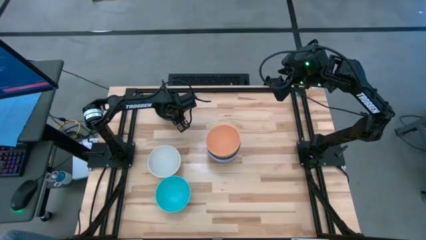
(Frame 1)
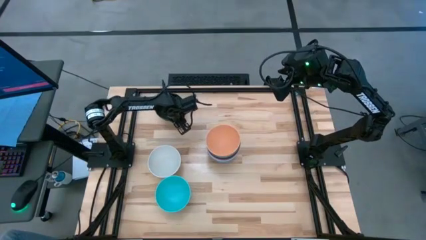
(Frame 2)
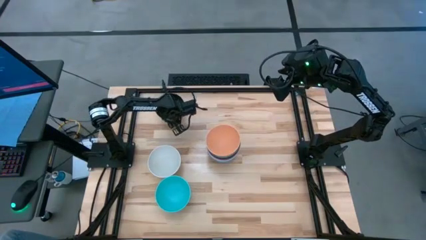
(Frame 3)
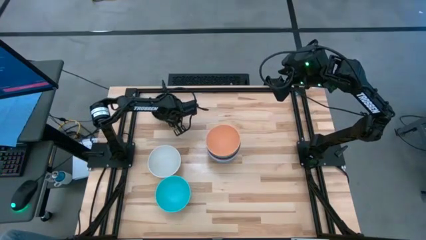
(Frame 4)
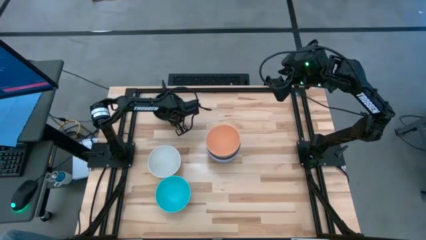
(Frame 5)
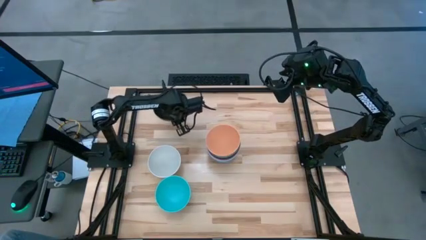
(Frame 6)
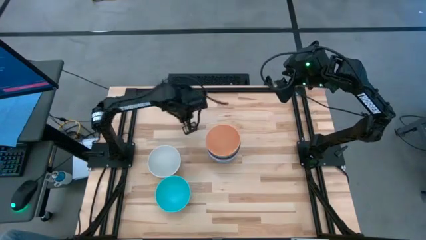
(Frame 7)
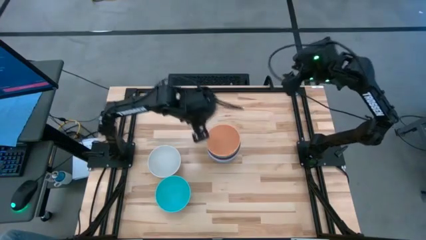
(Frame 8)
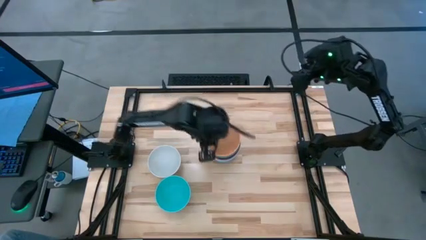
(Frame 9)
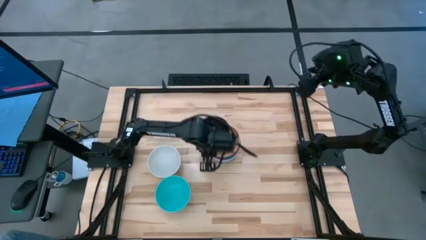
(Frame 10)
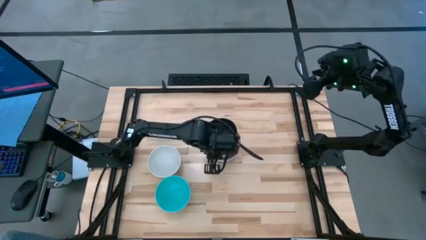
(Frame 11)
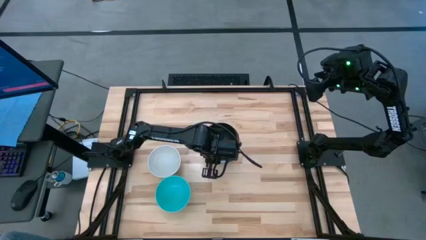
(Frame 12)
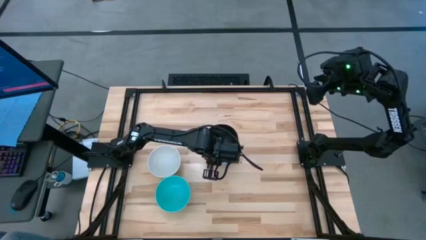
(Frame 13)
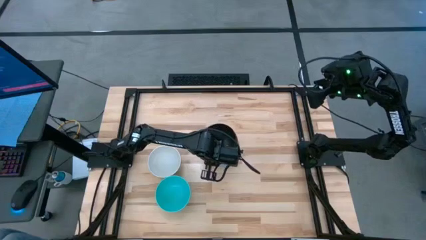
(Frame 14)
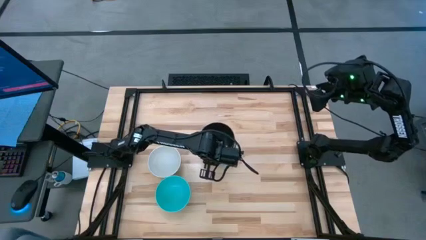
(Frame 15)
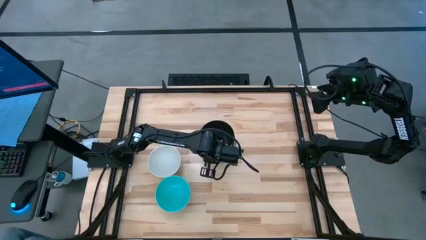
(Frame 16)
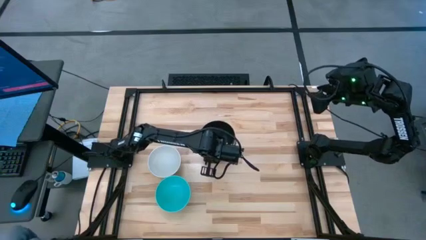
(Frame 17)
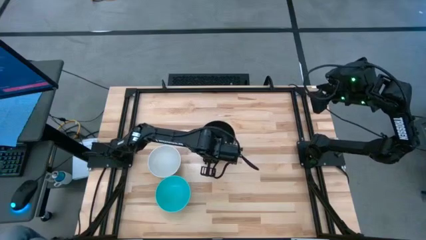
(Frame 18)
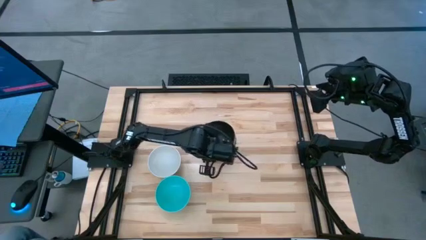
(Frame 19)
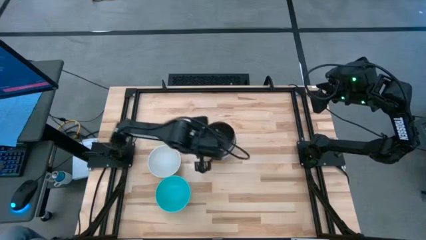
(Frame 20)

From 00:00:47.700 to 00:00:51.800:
Task: Nest bowls inside each other
Stack the black bowl on top of the orange bowls

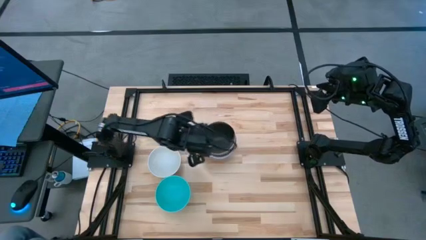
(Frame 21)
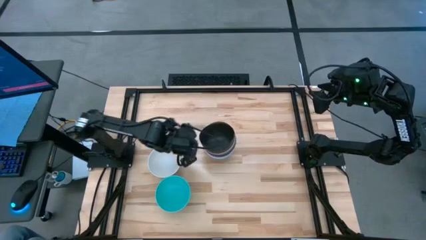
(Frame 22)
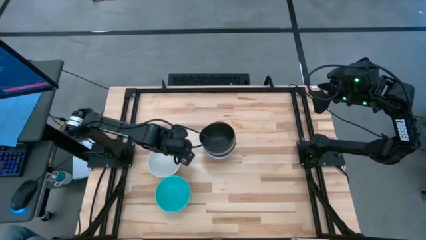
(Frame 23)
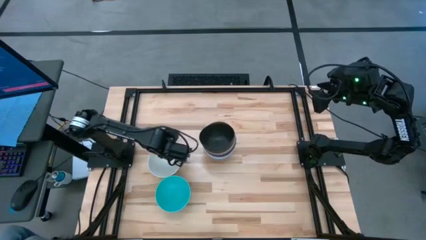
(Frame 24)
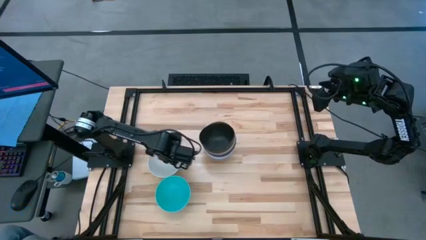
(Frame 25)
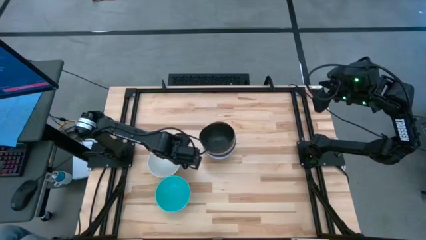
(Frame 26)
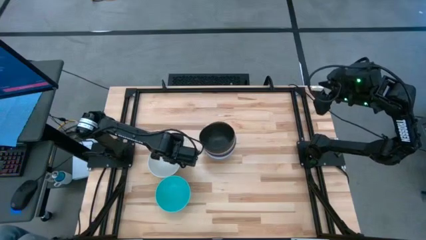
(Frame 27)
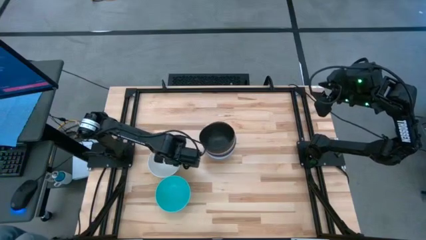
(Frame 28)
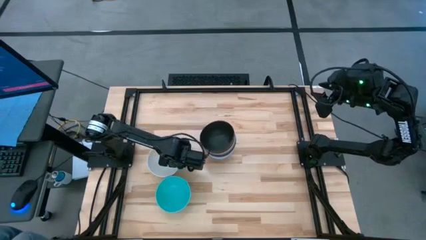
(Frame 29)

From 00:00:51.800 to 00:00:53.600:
Stack the gray bowl on top of the black bowls

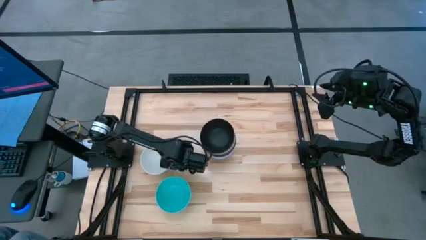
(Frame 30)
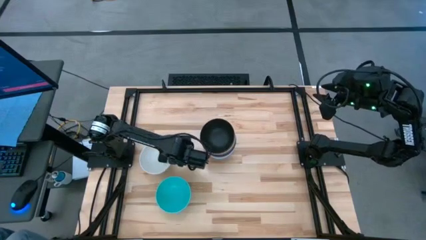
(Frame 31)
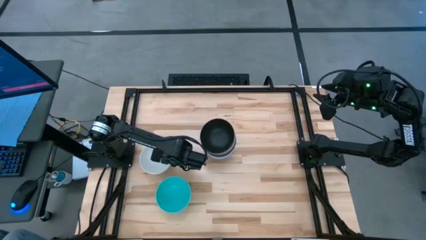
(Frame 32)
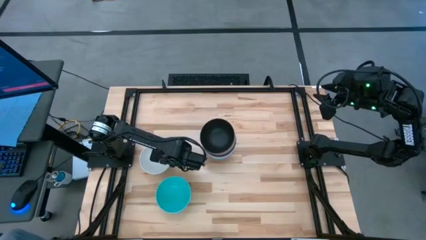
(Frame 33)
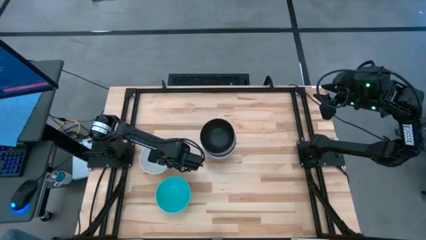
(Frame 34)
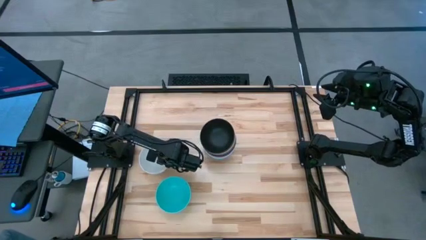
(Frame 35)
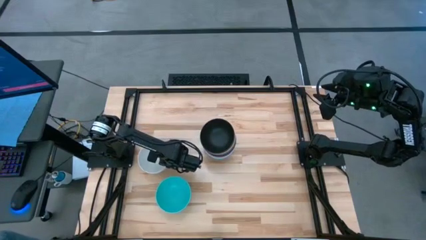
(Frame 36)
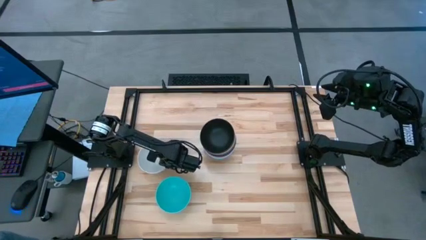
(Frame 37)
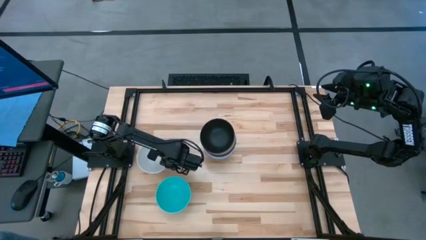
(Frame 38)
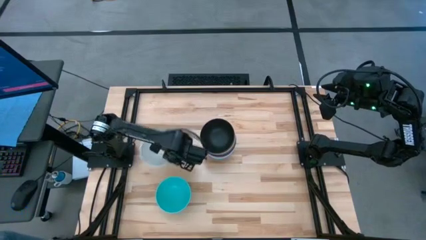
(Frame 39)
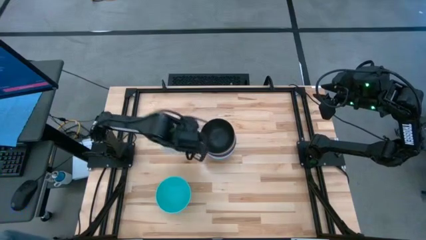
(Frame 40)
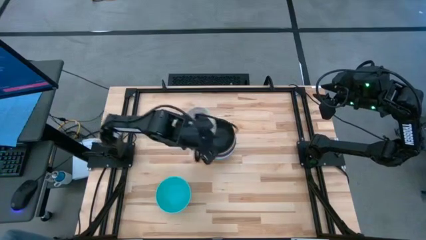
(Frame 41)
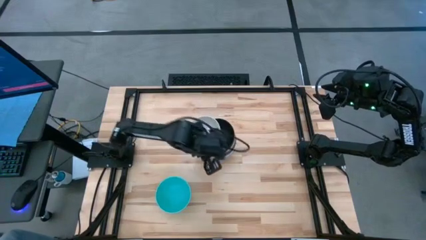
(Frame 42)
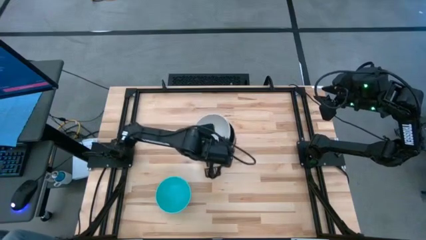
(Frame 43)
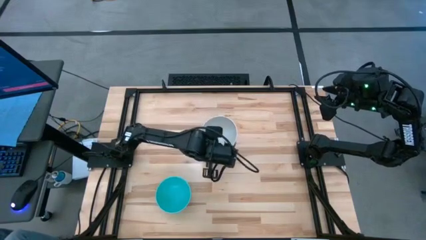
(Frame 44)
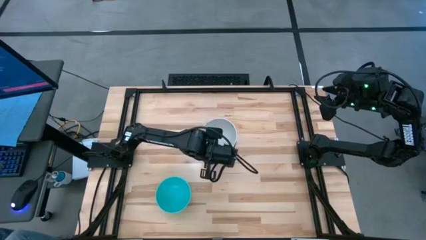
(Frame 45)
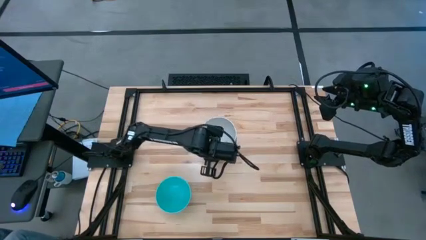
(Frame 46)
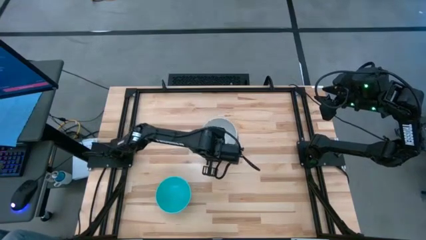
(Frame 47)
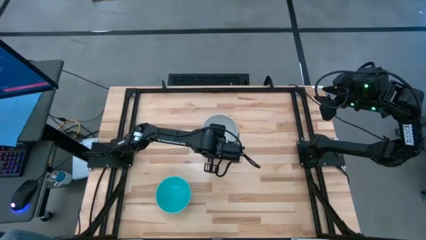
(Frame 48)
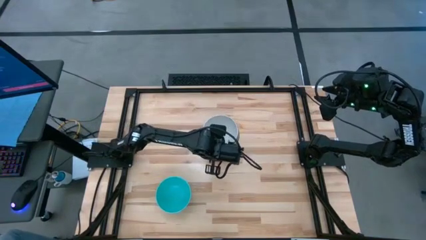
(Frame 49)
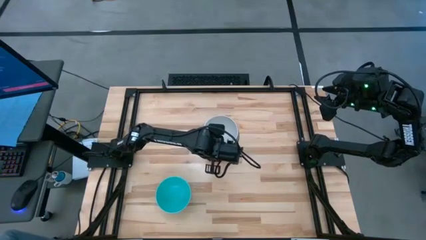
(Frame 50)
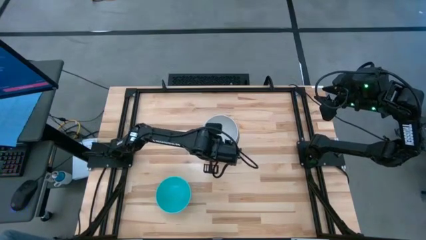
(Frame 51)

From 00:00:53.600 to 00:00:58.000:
Stack the gray bowl on top of the black bowls

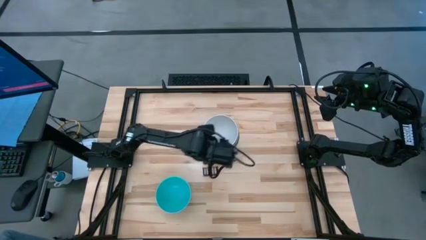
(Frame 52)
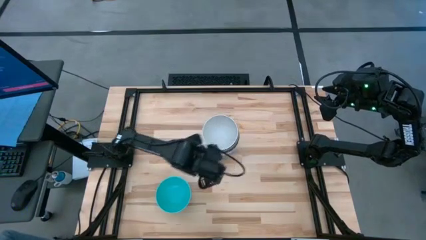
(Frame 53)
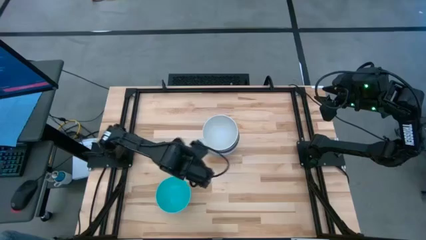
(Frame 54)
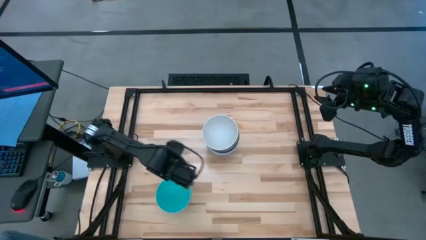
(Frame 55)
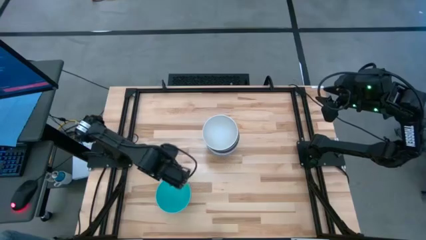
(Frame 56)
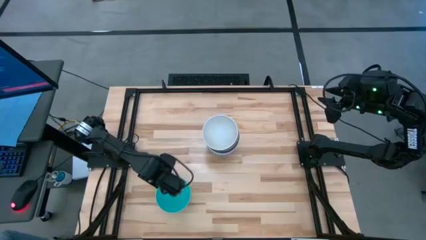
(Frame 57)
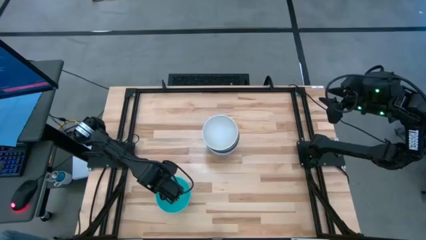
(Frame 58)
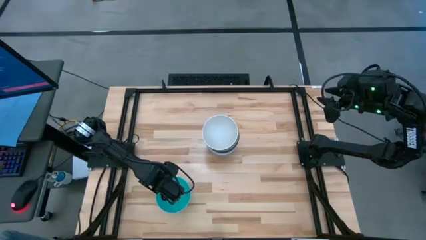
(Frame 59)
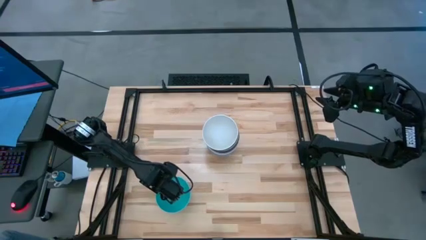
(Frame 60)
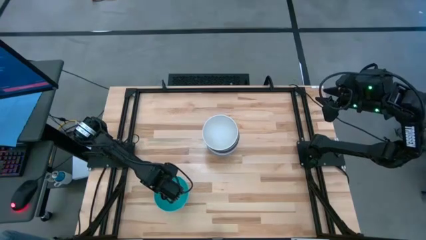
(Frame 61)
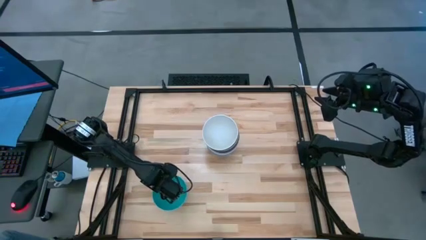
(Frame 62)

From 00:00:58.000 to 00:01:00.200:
Stack the blue bowl on top of the gray bowls

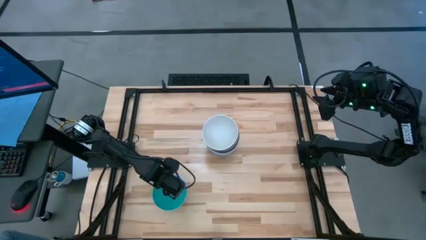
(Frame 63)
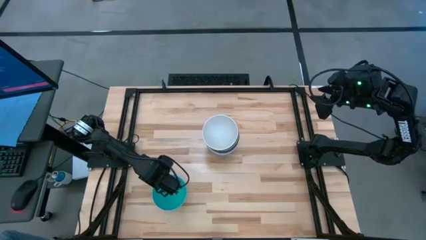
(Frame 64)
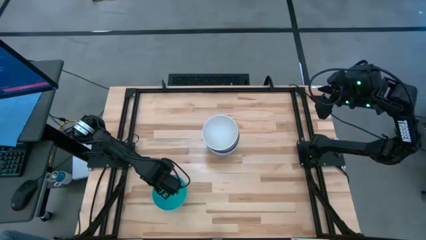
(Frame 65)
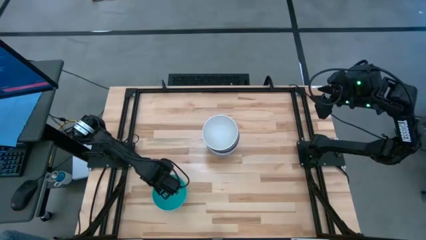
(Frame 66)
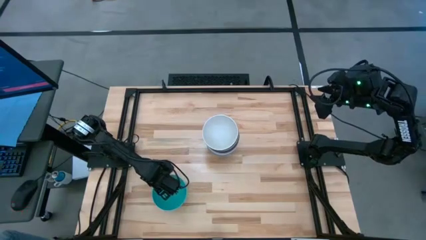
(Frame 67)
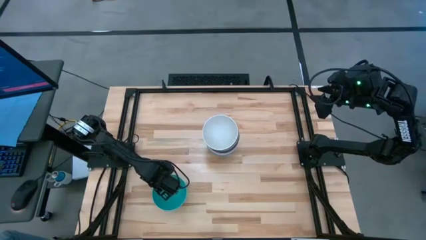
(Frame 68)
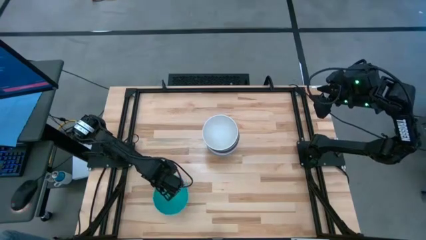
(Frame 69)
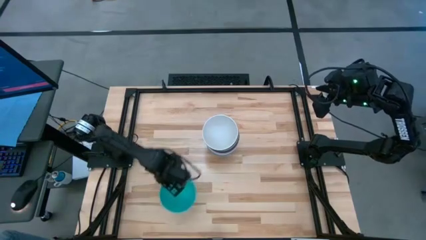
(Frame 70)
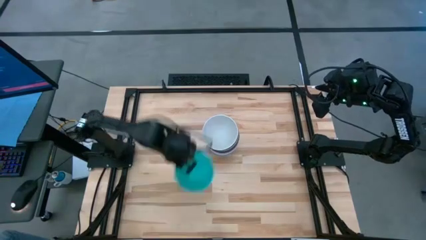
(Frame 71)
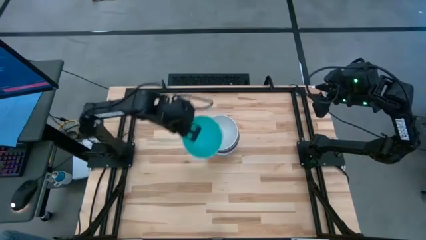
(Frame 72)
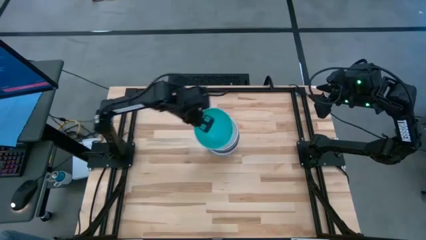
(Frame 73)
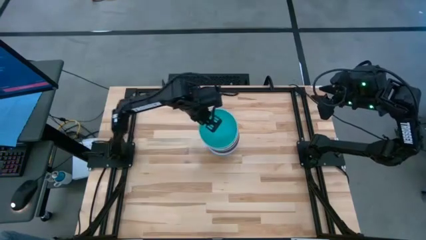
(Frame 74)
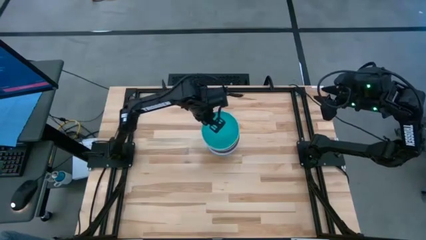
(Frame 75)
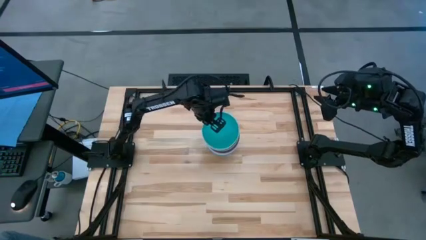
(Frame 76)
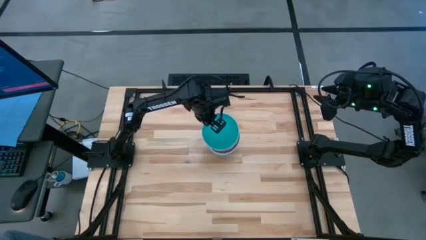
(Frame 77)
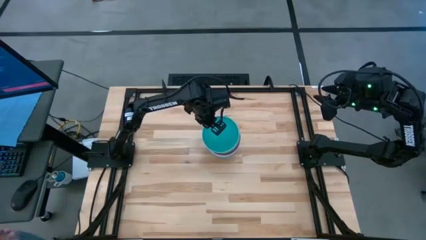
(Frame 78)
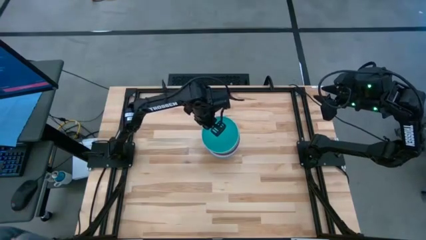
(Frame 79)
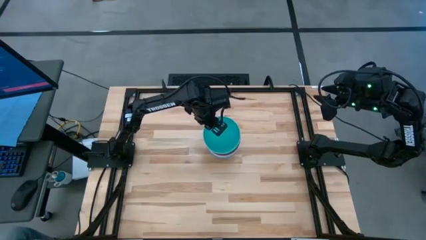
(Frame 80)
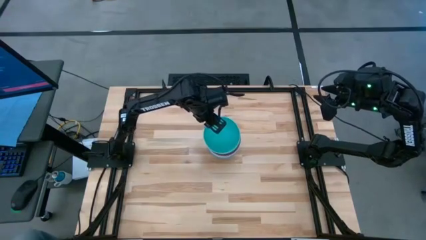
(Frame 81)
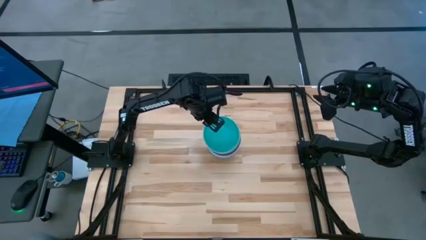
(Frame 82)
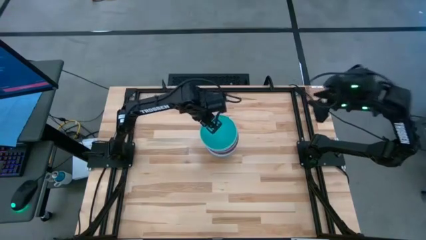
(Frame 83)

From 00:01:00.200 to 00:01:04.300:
Stack the blue bowl on top of the gray bowls
